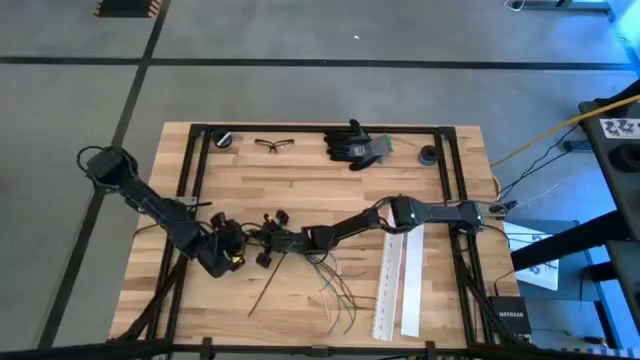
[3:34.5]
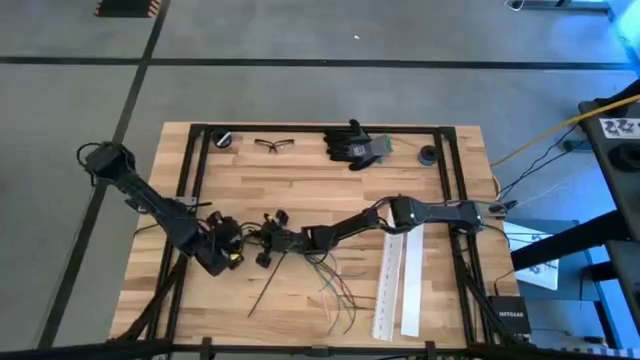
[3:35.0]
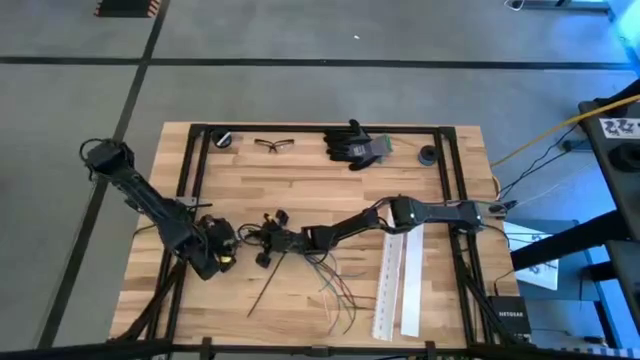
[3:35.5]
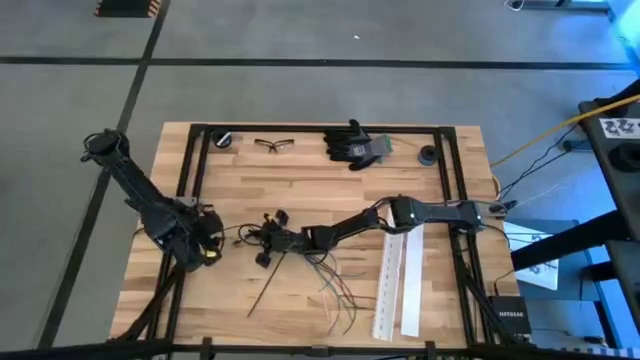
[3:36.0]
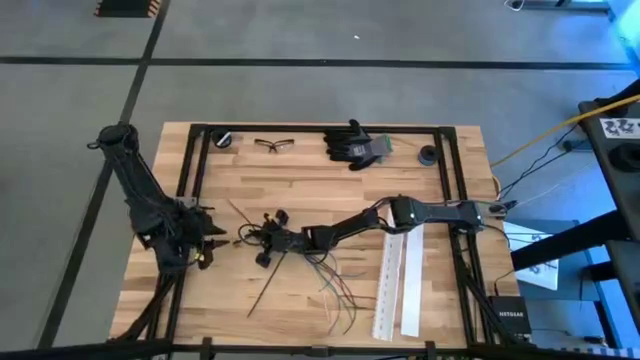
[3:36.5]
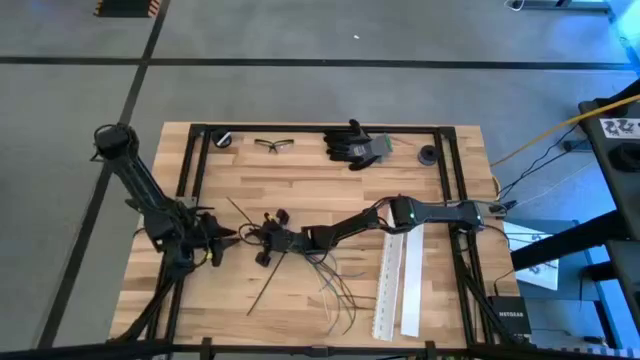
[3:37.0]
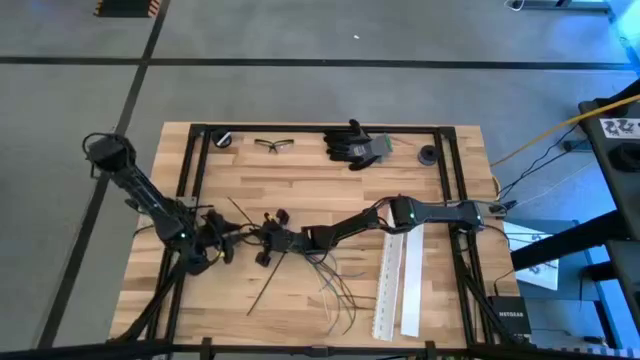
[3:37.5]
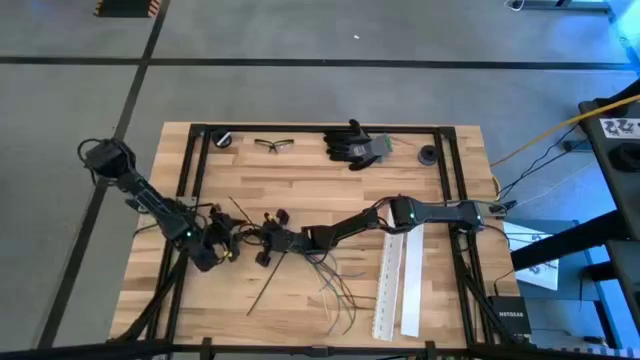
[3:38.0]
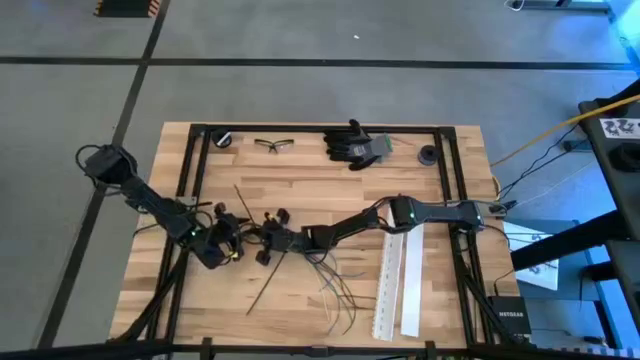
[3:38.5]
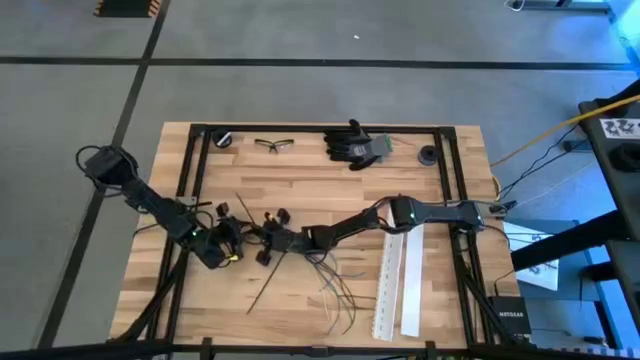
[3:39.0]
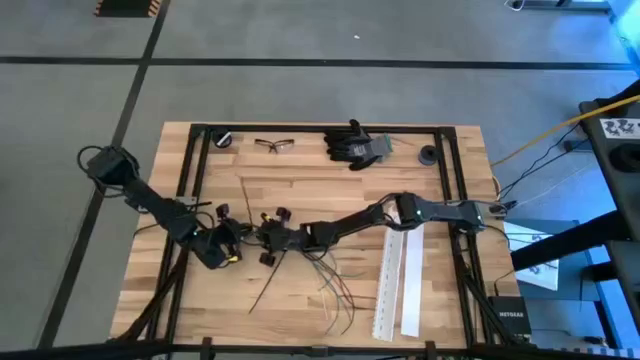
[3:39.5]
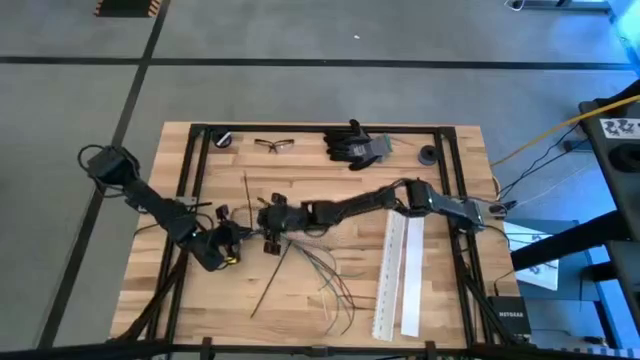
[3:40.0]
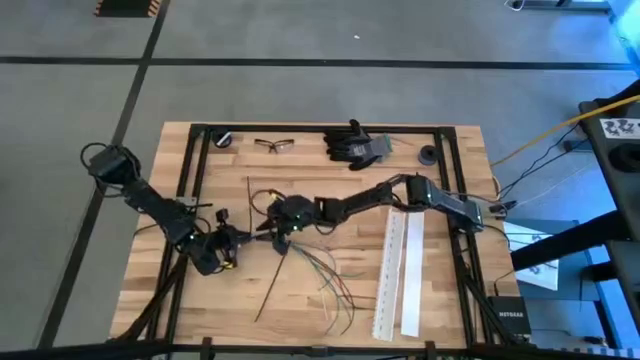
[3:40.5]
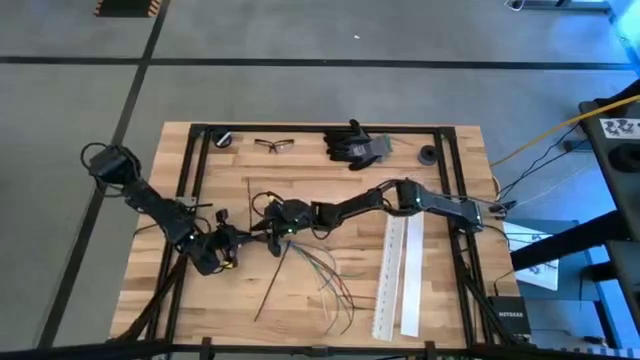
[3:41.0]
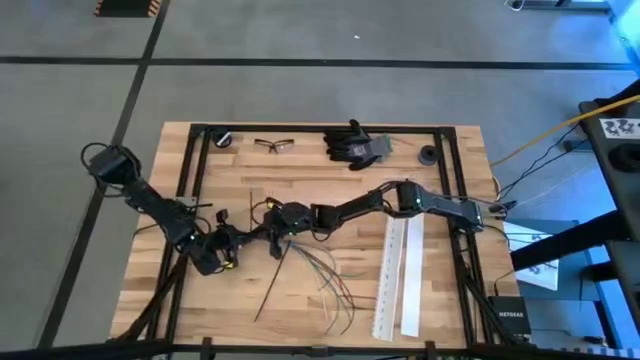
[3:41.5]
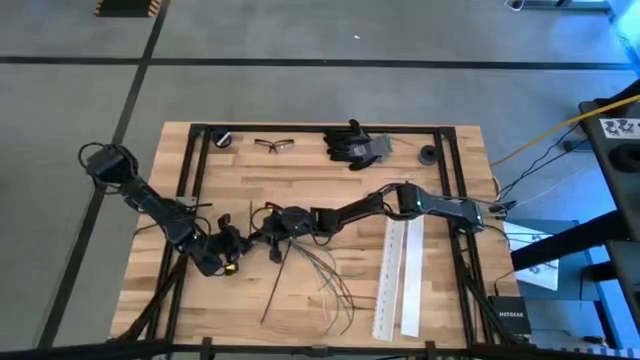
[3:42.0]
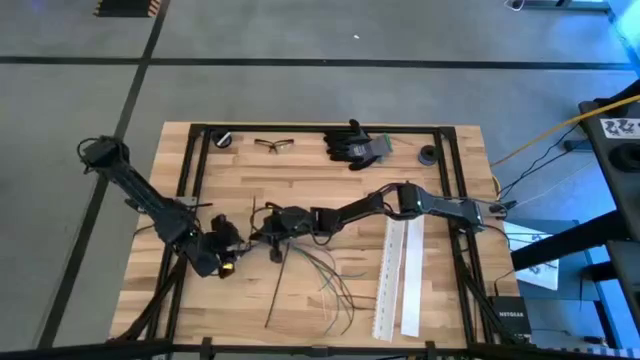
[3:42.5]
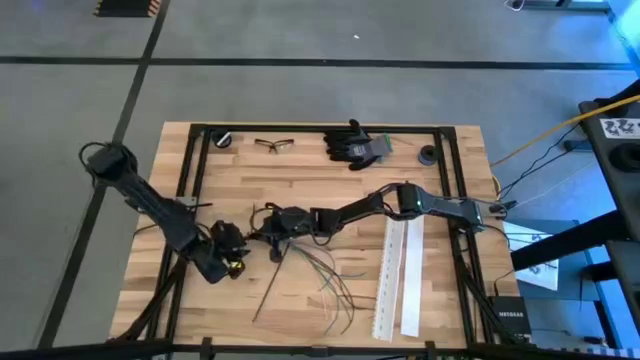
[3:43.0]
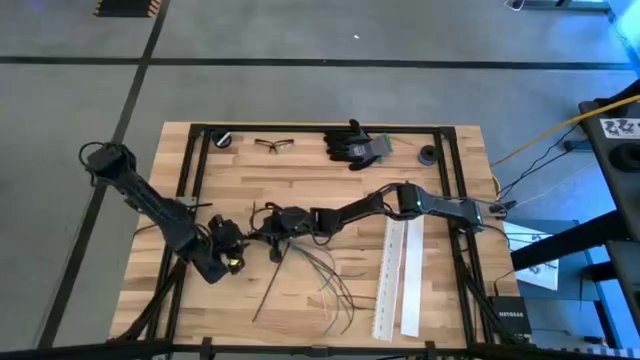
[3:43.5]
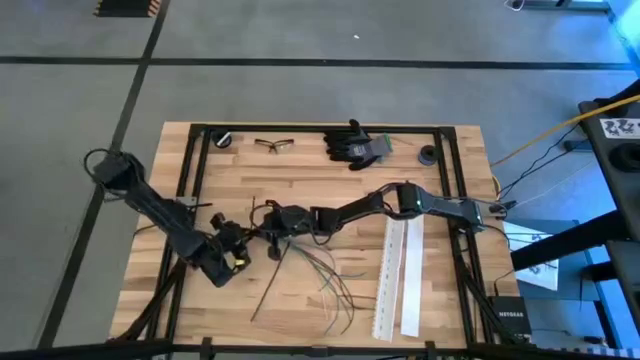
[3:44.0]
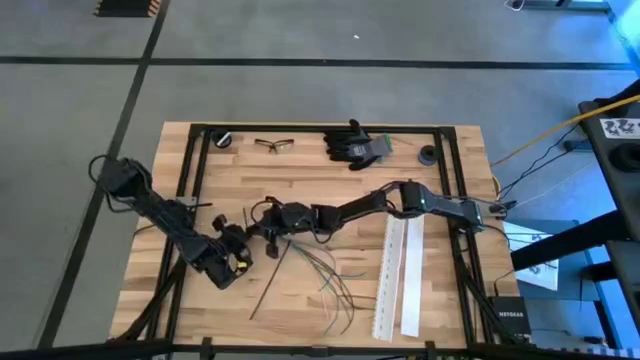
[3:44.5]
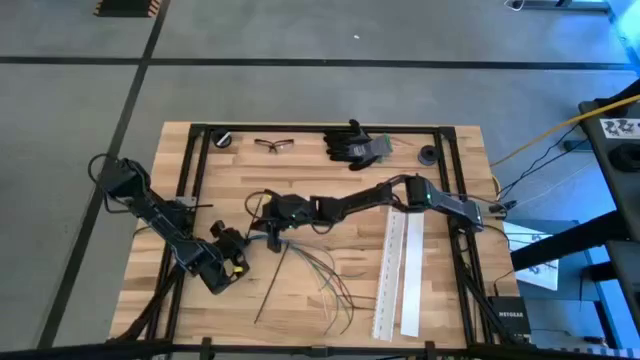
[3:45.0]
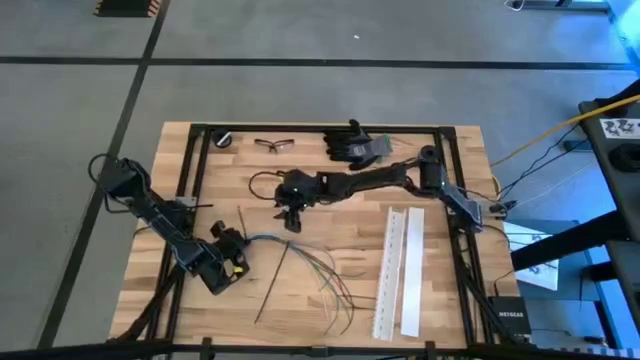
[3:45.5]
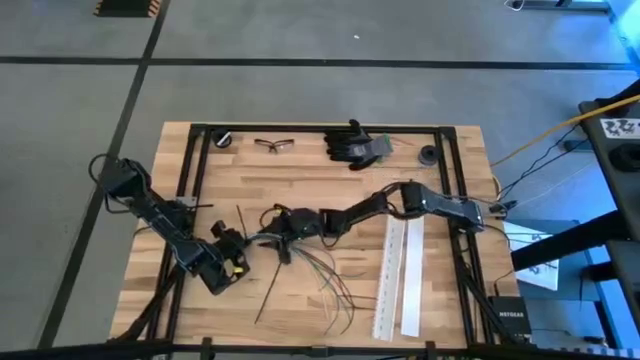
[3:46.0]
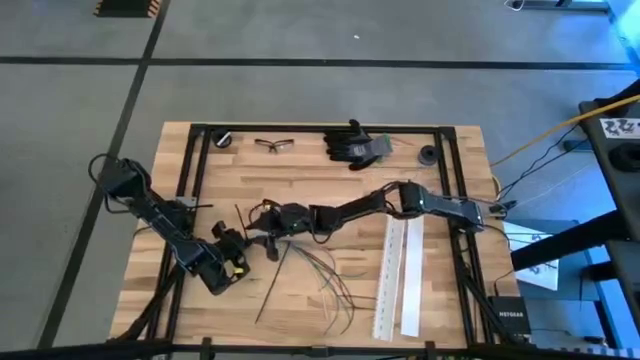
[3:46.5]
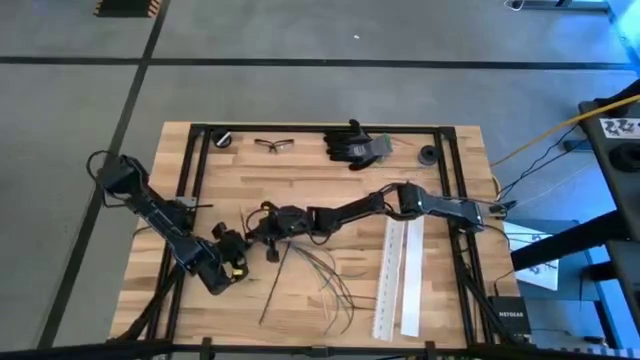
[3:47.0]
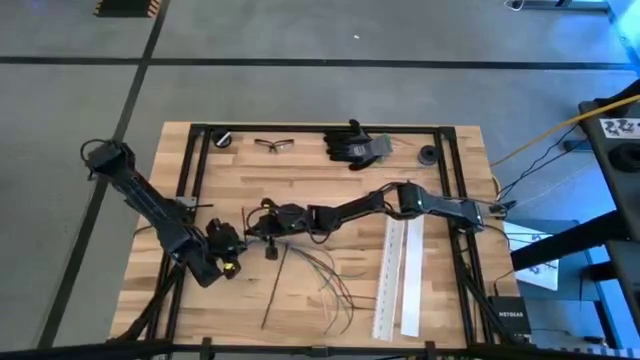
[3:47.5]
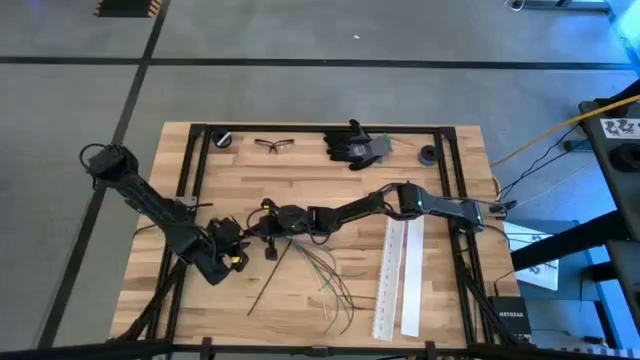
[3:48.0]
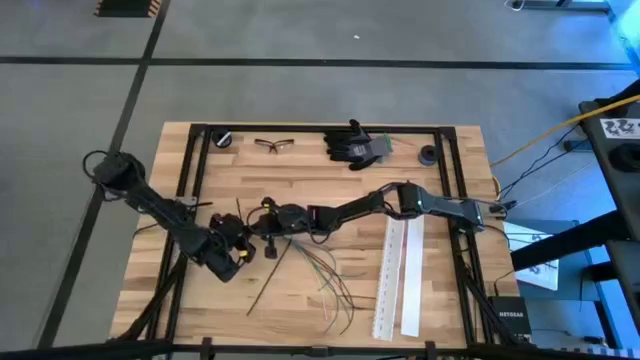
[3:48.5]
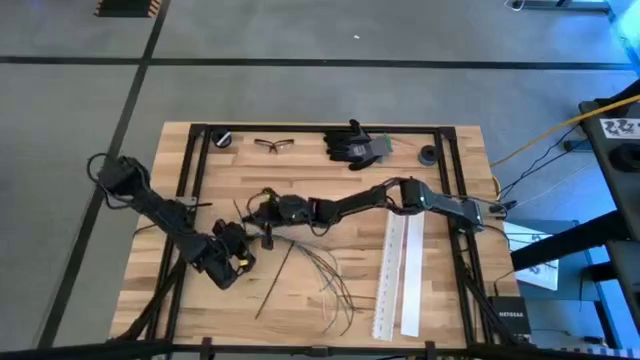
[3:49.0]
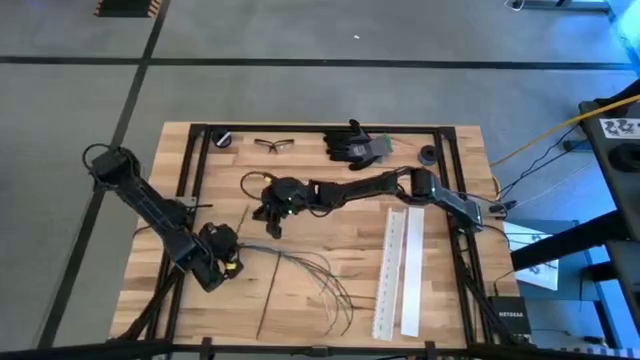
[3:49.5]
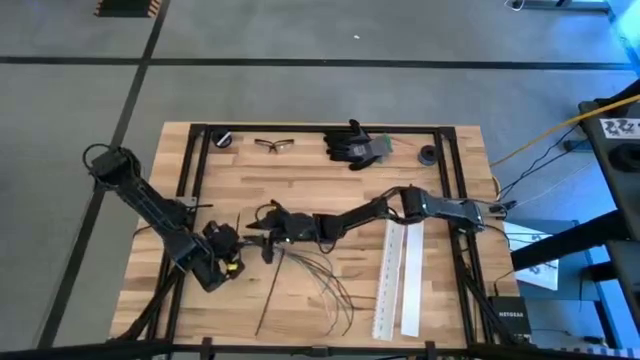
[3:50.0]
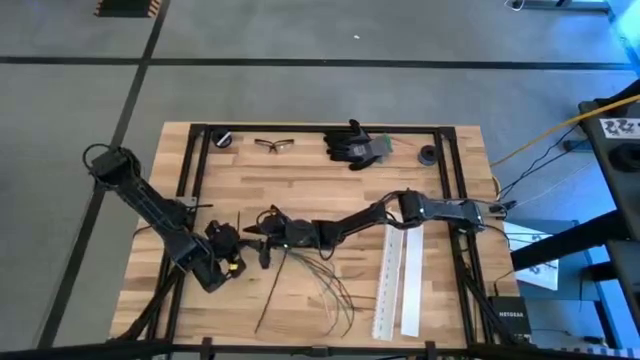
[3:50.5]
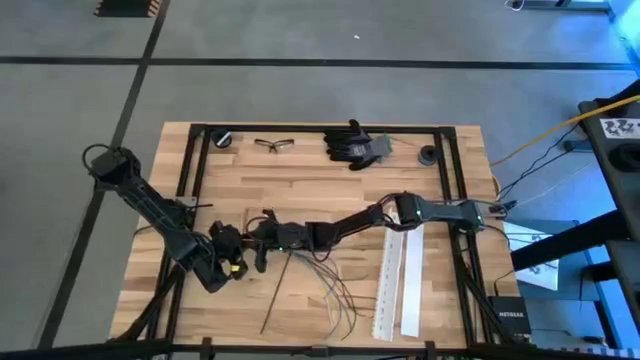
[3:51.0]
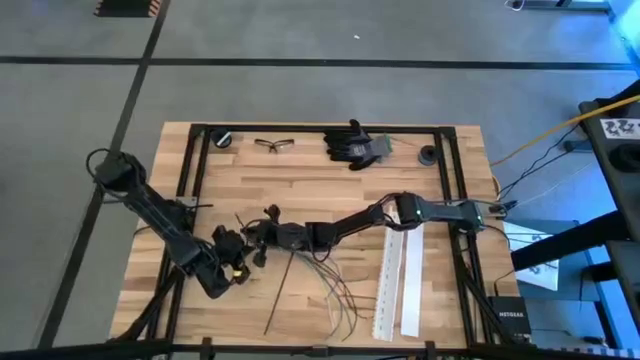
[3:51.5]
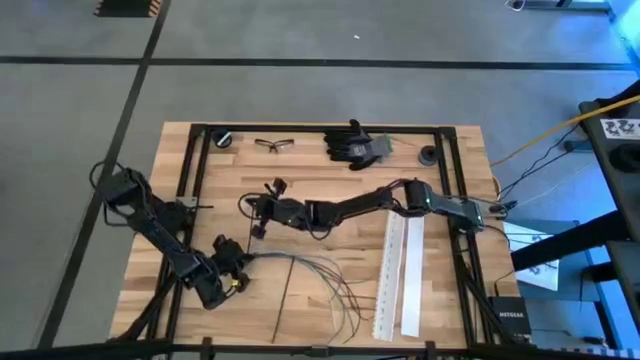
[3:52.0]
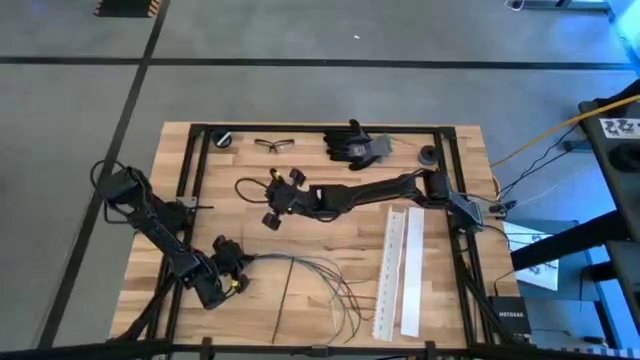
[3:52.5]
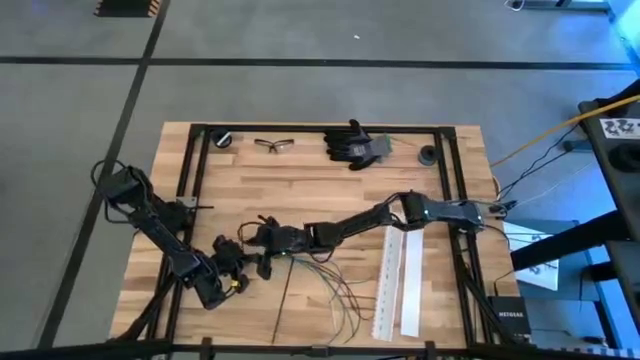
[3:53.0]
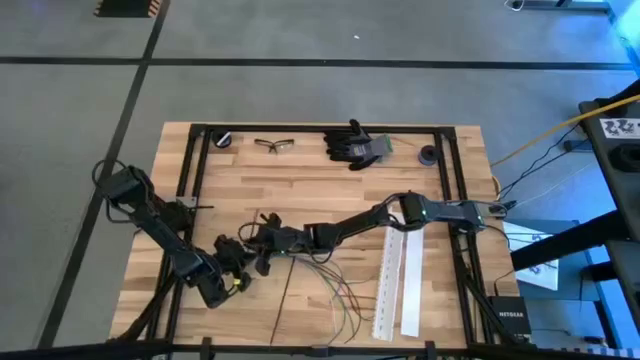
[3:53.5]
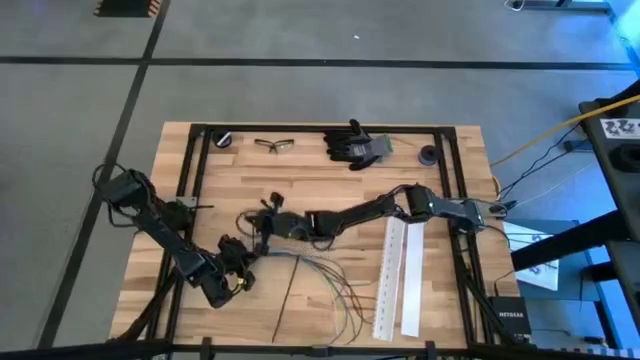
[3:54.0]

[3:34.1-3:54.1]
Task: Ziptie cables
Wrap the zip tie on the cables

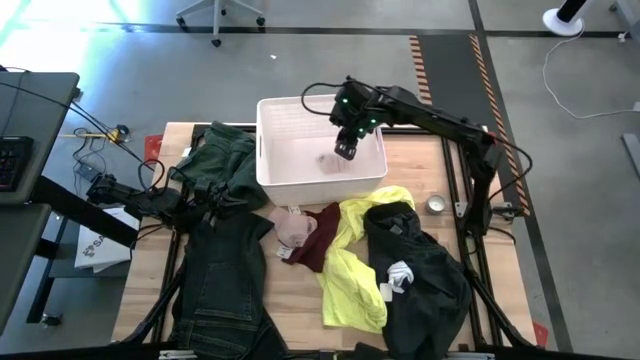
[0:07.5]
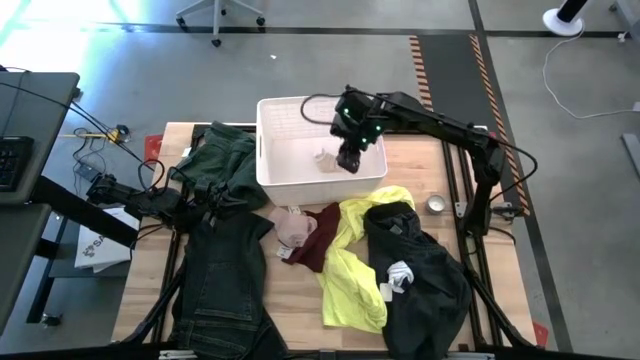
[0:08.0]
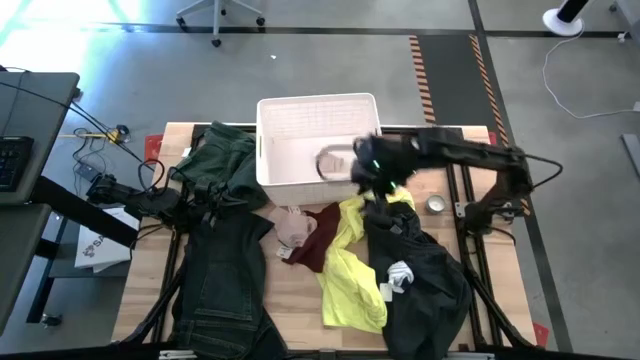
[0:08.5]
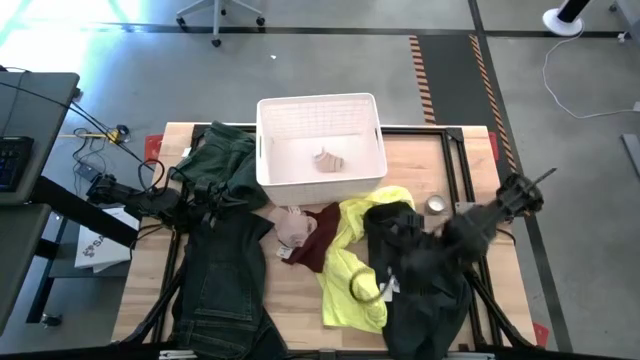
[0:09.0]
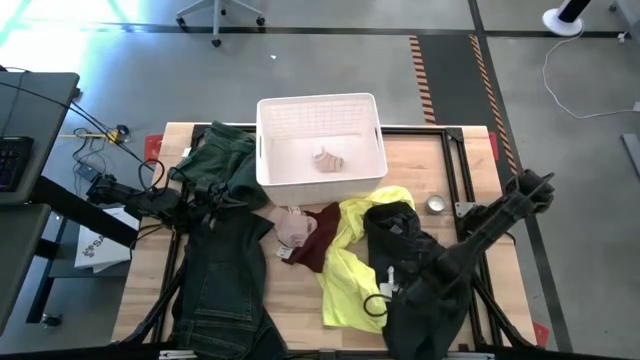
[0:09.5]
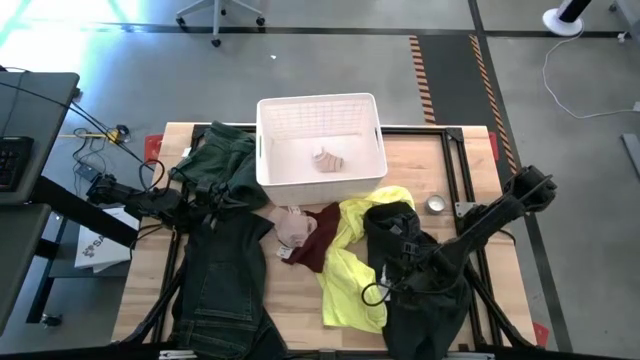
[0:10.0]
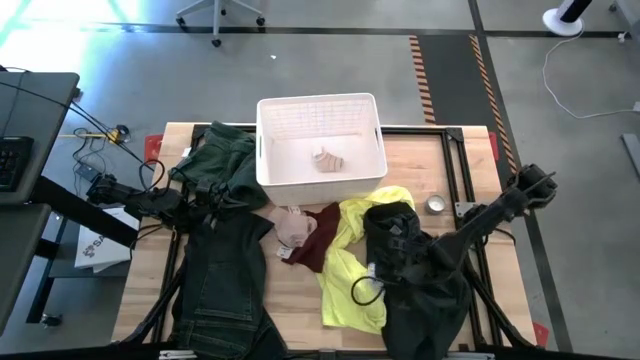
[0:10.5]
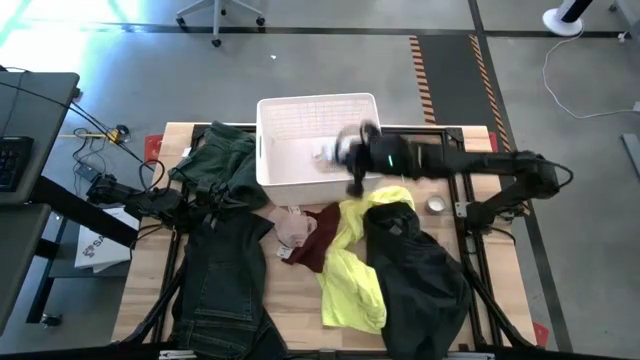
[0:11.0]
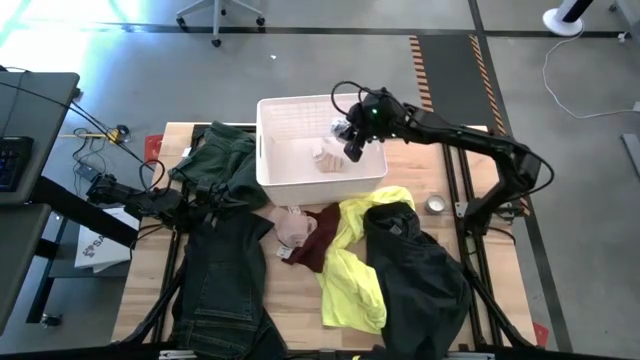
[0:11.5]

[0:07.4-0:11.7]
Task: Sort clothes
Put the white striped sock into the white laundry bin
